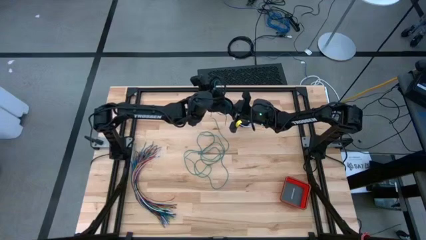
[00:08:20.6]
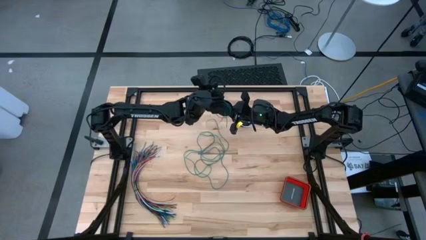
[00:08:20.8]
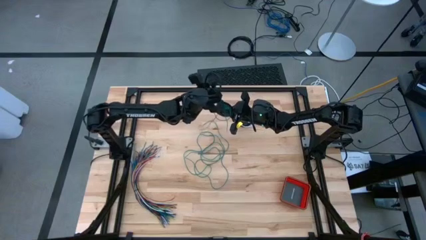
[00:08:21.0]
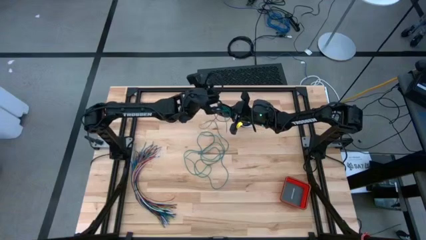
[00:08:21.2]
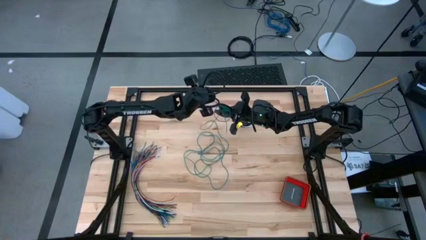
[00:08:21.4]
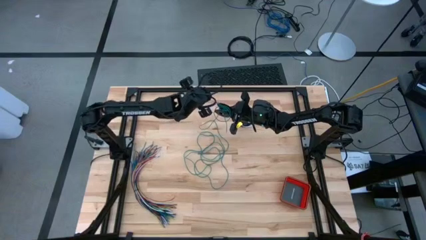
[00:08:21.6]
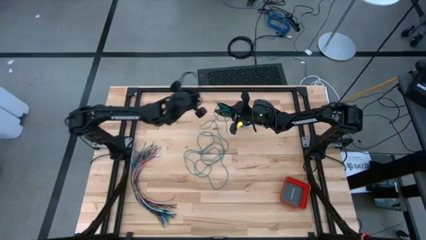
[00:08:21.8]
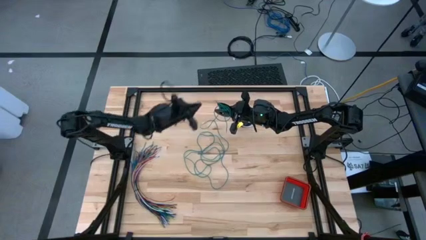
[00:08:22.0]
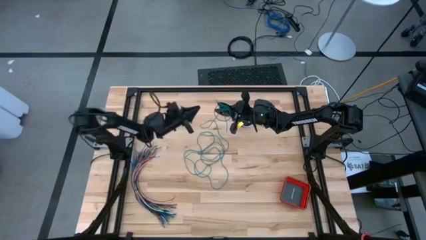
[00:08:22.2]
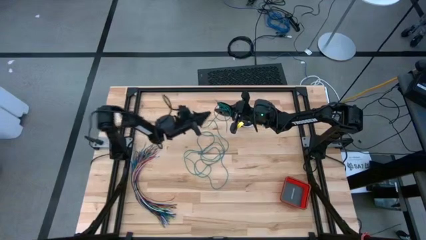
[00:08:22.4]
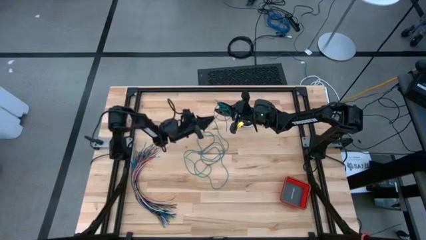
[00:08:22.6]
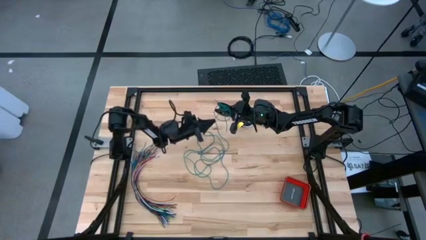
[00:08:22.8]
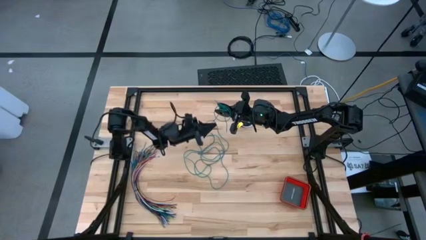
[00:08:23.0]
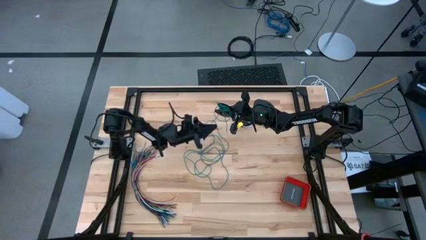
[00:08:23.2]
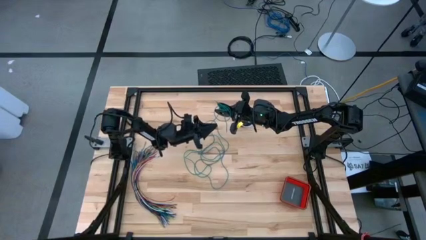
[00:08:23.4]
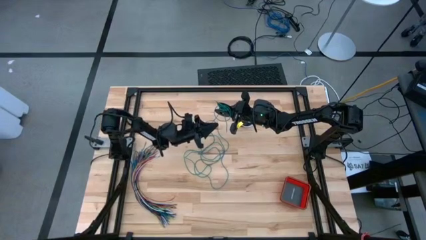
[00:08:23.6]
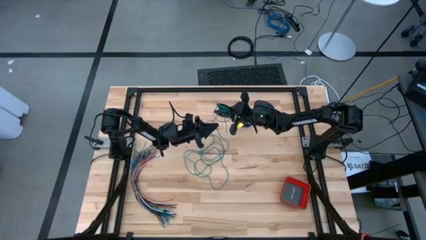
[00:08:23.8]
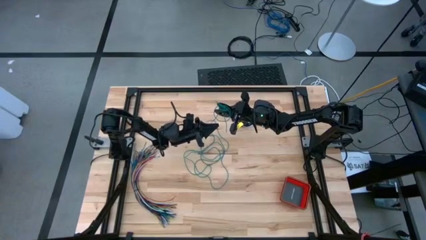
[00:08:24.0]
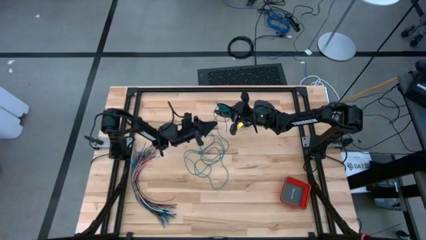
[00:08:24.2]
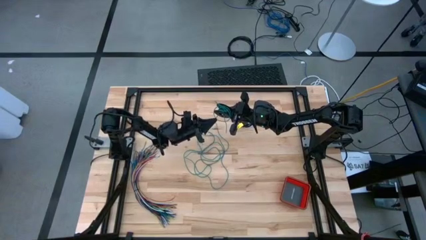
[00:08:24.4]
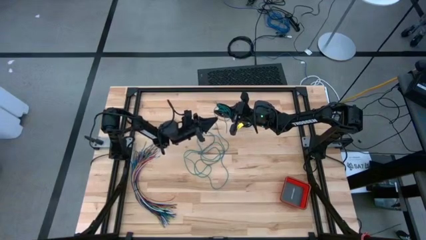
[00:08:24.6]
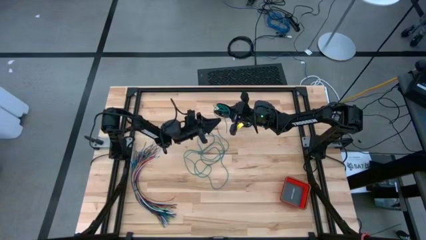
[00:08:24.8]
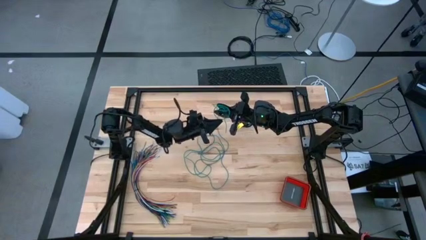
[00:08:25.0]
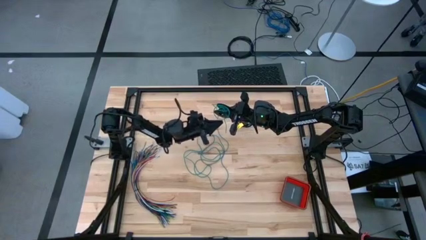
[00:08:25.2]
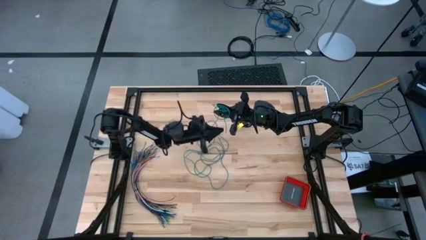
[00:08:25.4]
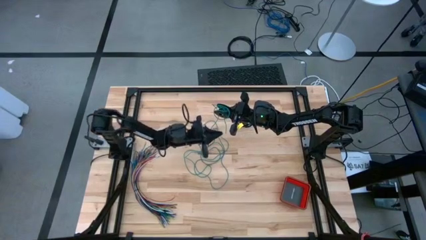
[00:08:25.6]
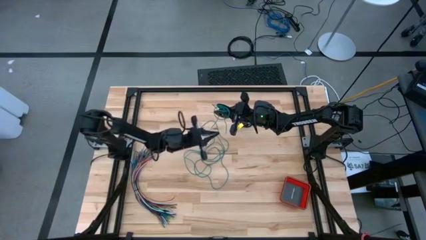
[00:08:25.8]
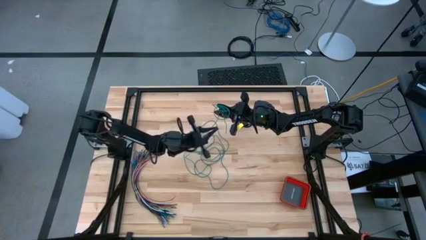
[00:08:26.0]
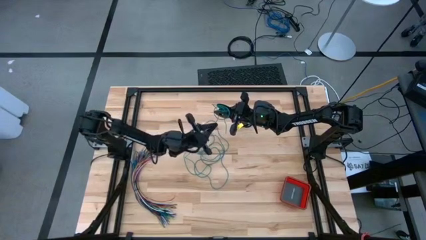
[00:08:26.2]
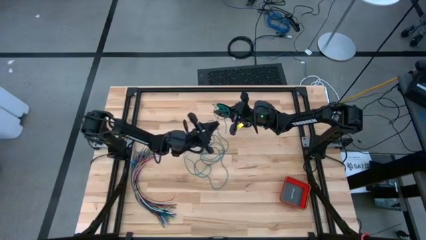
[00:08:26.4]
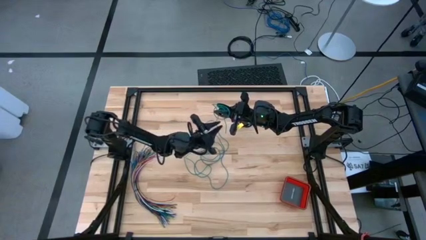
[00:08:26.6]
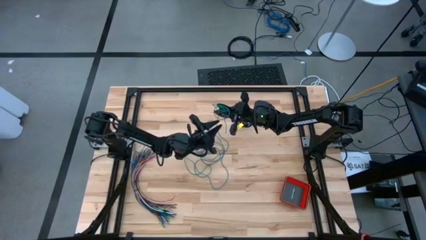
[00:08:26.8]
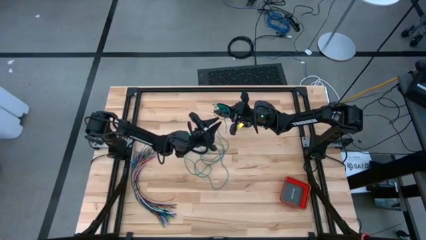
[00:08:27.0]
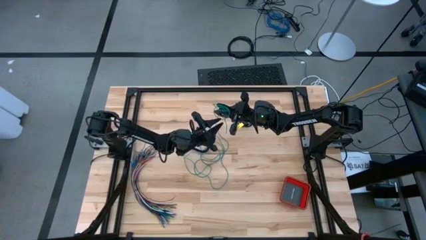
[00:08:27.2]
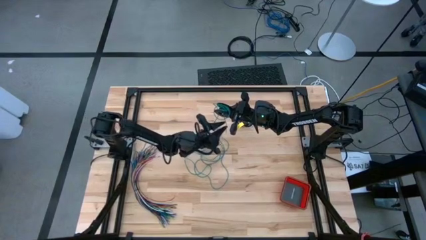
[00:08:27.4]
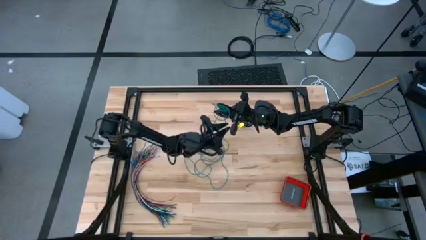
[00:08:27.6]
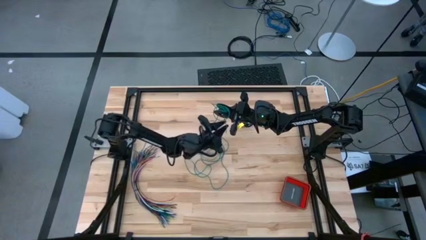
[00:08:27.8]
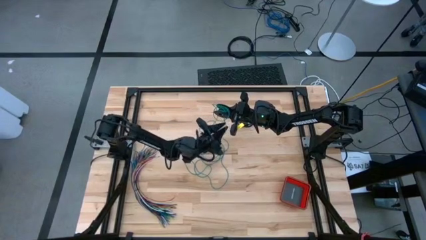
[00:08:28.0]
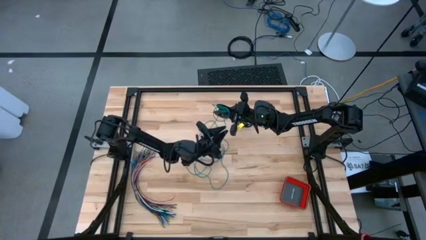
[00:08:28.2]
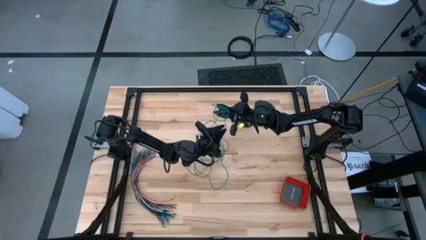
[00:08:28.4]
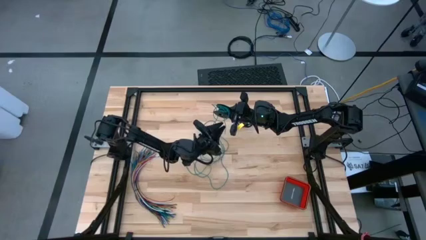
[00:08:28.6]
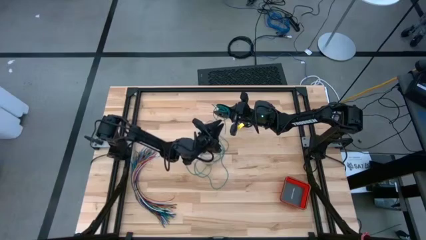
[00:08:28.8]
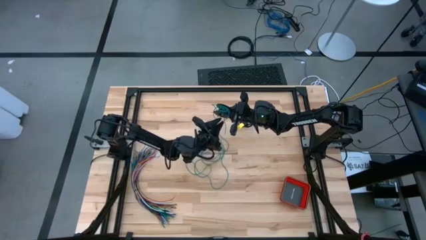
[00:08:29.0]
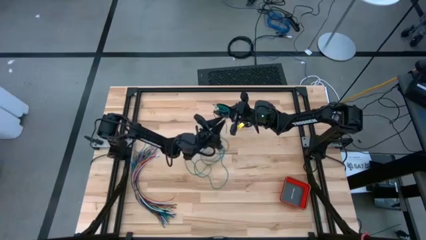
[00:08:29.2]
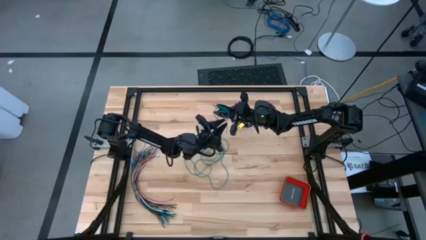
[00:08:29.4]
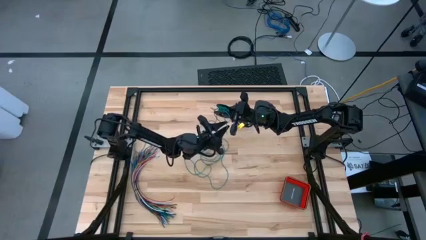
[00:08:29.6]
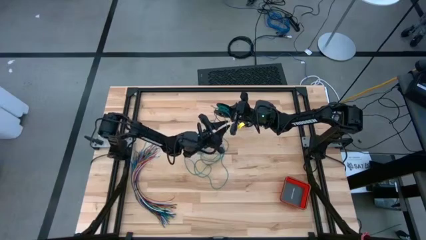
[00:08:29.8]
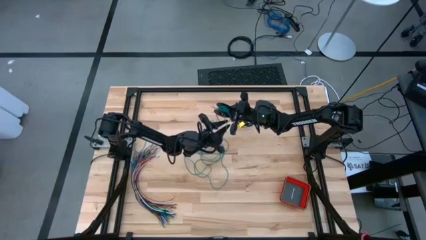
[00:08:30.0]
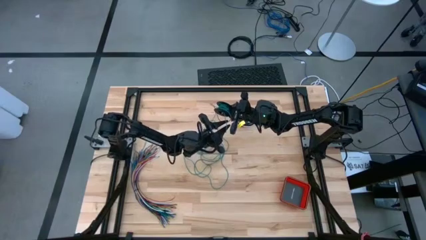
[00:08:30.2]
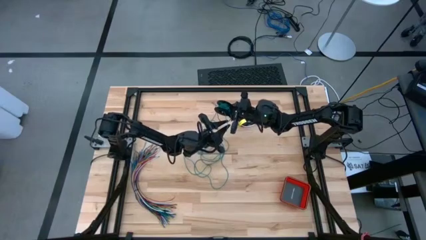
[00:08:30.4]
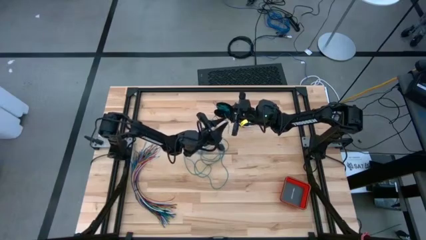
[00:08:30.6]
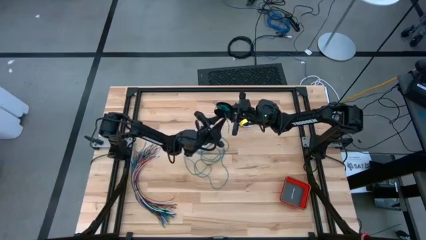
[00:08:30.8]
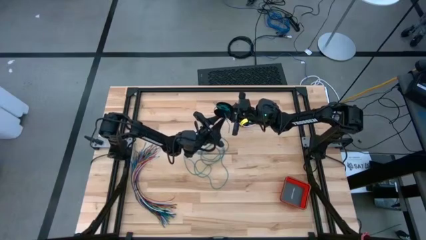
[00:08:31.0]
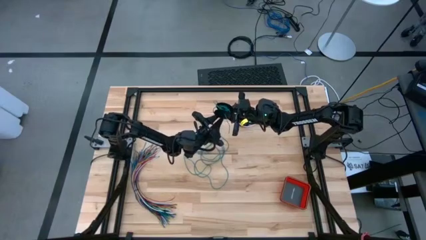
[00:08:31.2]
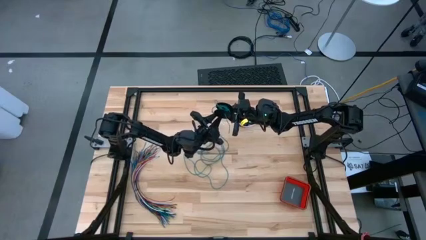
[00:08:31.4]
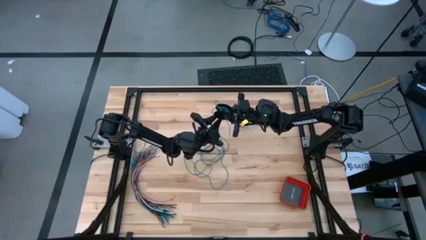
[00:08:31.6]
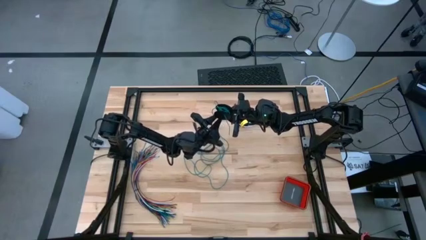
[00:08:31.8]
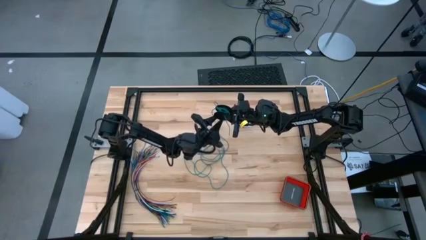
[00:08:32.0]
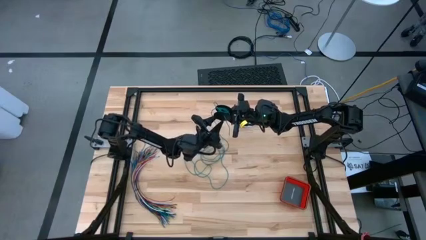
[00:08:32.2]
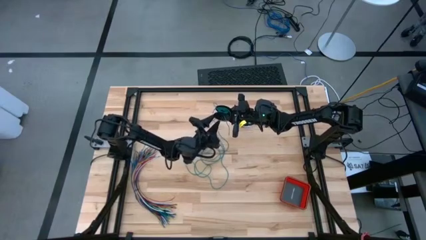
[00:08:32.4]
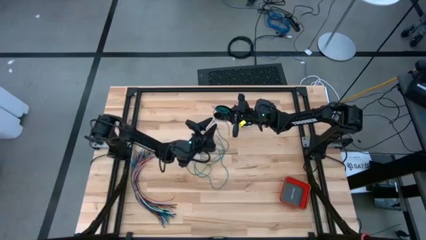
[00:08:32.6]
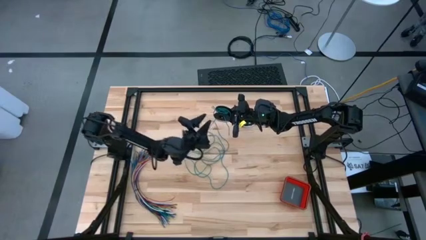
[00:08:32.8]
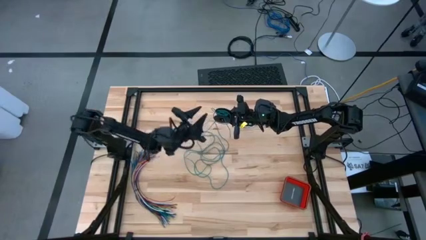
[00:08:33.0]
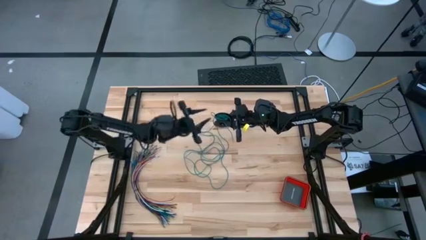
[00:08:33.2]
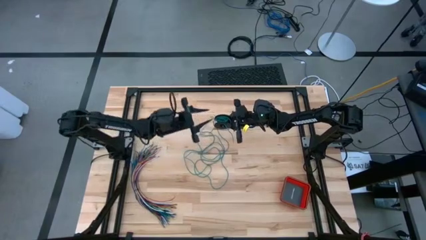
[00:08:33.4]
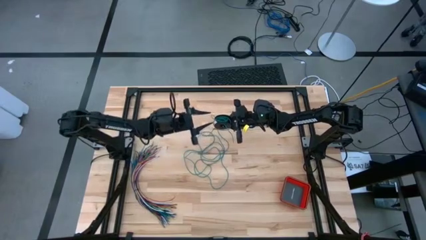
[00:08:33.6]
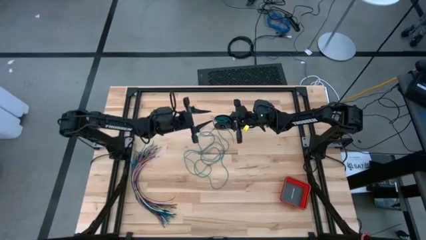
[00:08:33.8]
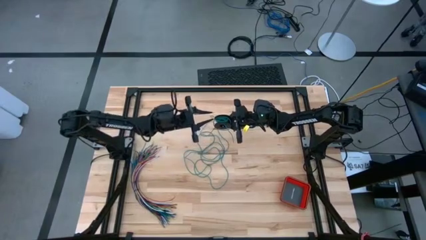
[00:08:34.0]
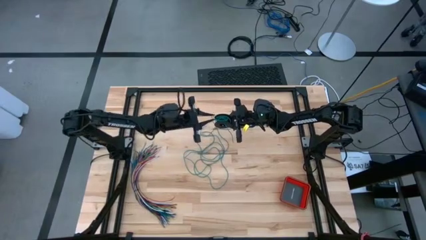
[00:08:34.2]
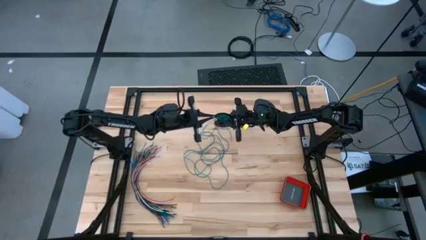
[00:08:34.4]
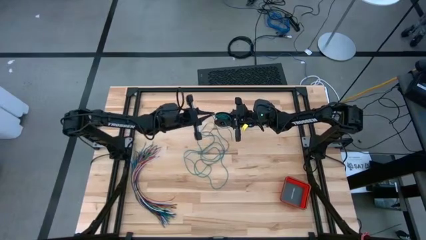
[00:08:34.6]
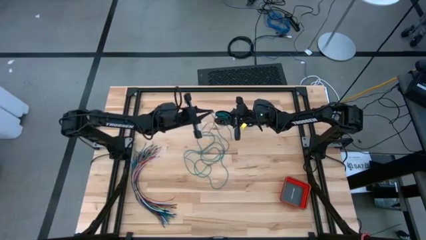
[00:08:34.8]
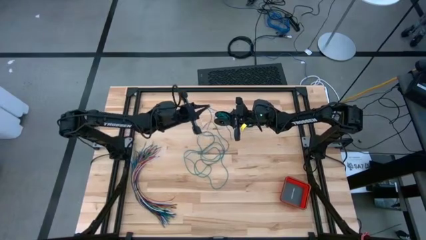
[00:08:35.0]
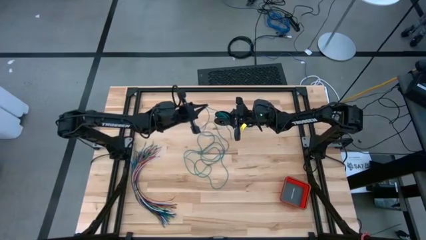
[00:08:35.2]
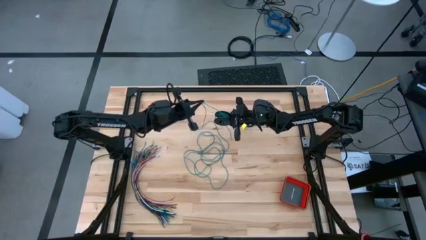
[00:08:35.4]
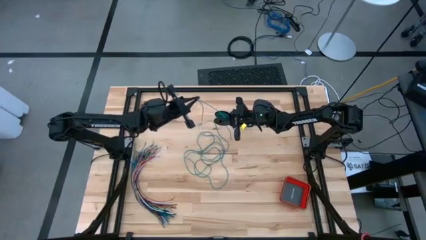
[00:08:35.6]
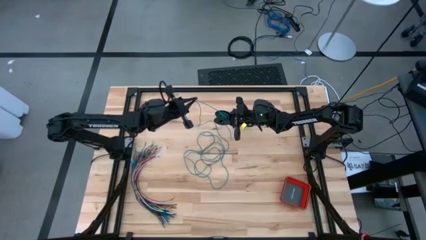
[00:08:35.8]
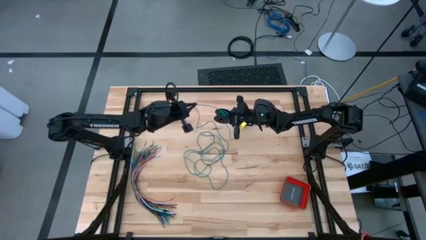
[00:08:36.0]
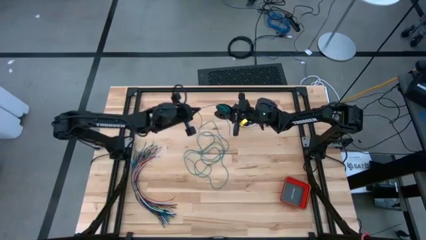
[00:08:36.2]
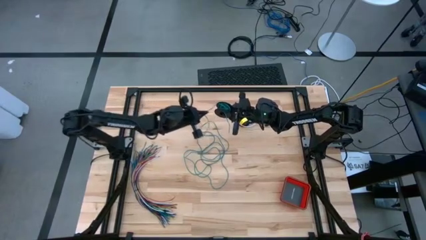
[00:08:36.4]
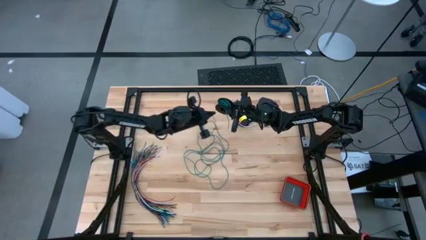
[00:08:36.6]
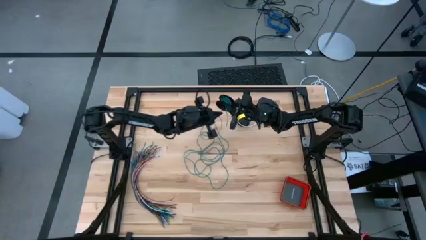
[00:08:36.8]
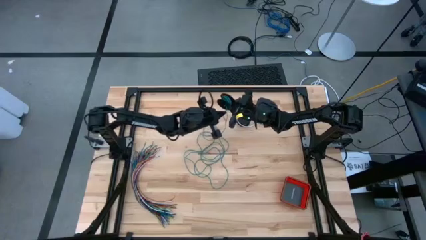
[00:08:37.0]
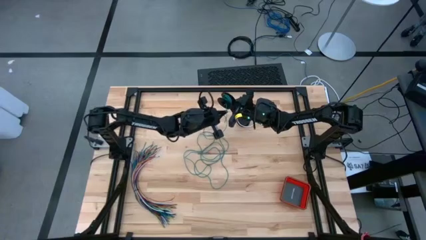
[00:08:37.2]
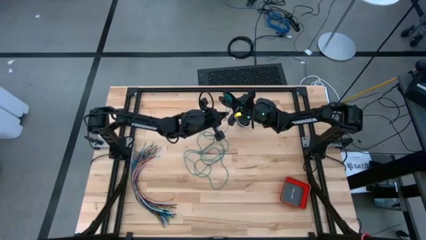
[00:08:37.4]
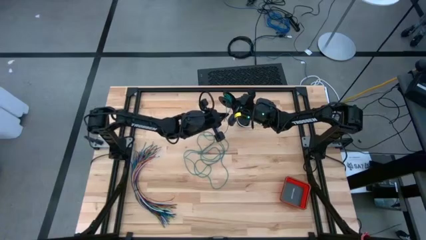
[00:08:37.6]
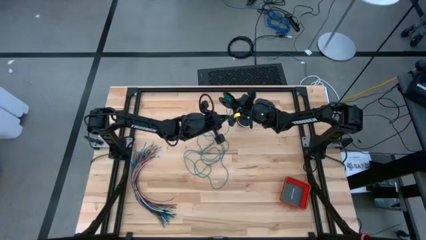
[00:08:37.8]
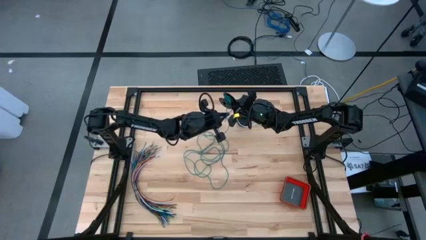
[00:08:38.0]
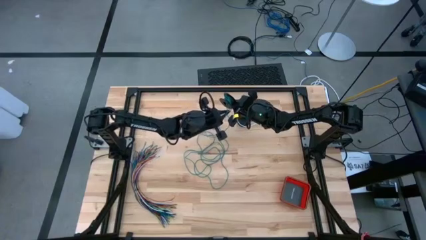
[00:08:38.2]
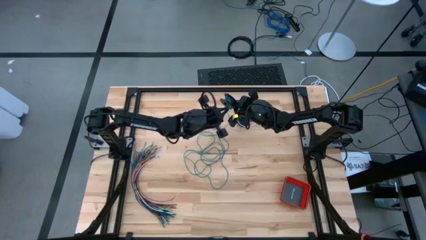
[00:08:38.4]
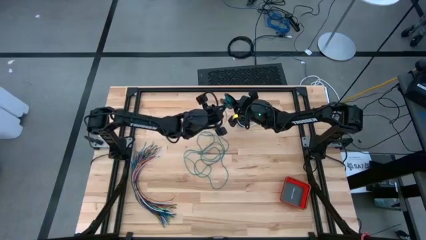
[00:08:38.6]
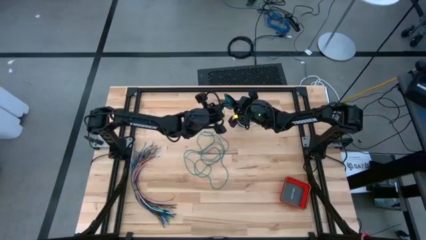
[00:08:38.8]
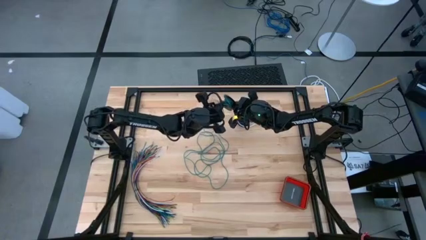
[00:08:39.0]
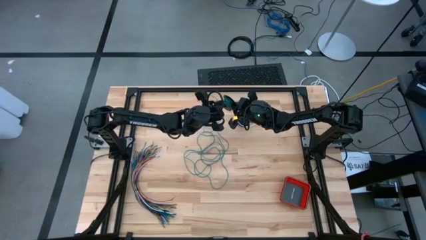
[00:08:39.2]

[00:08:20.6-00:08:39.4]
Task: Coil cords
Coil the green wire onto the spool
